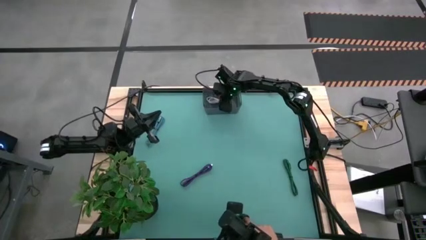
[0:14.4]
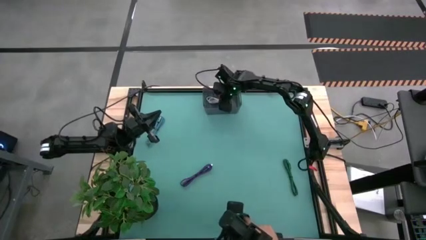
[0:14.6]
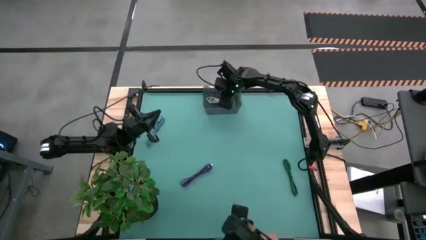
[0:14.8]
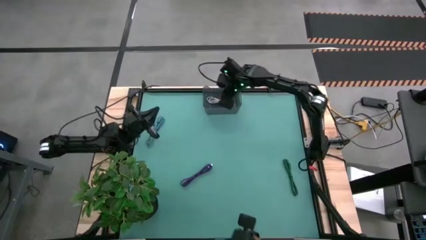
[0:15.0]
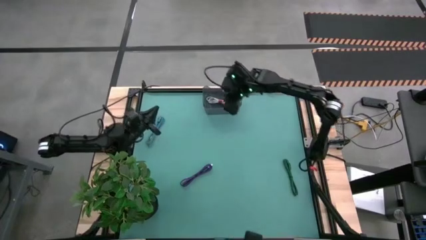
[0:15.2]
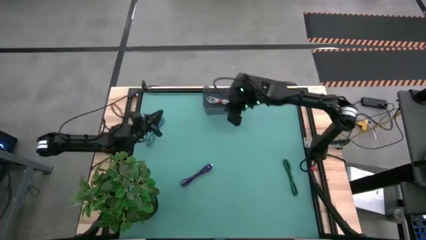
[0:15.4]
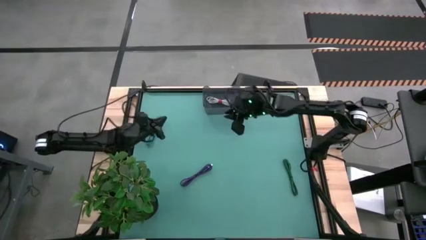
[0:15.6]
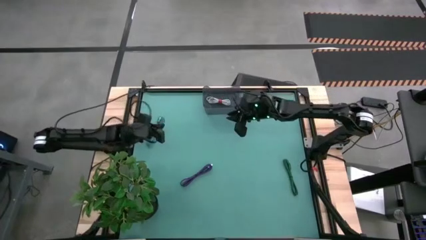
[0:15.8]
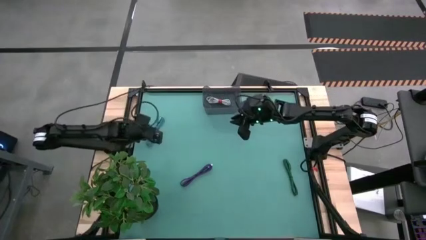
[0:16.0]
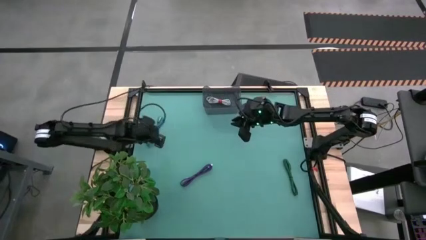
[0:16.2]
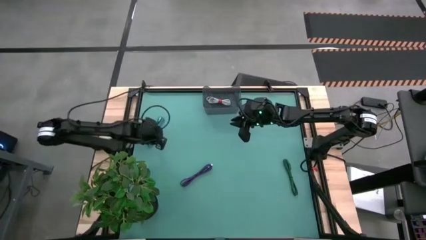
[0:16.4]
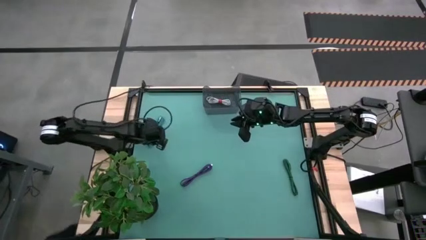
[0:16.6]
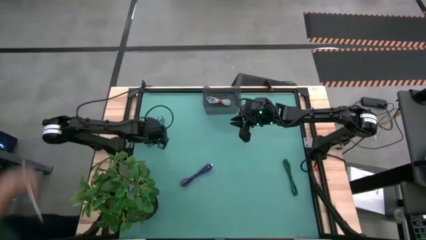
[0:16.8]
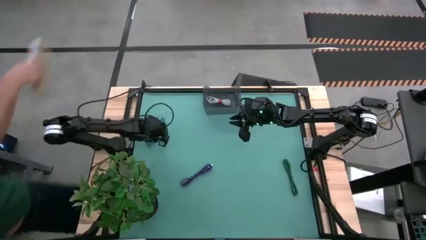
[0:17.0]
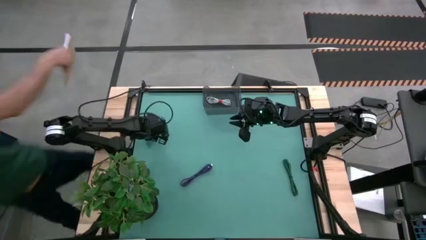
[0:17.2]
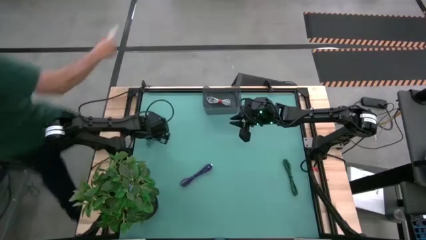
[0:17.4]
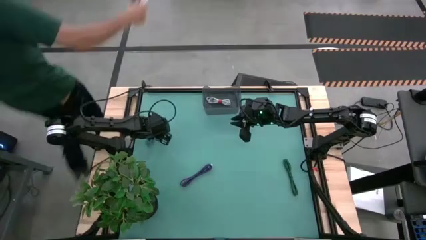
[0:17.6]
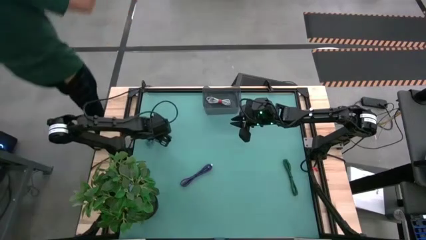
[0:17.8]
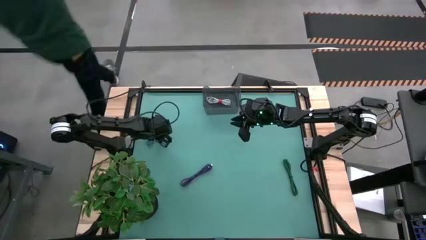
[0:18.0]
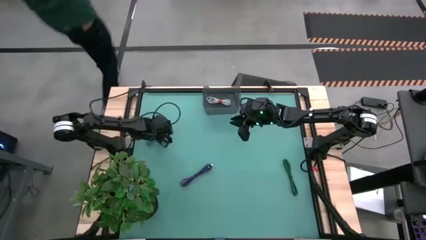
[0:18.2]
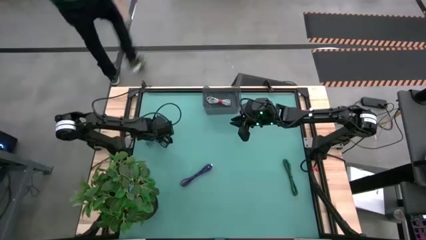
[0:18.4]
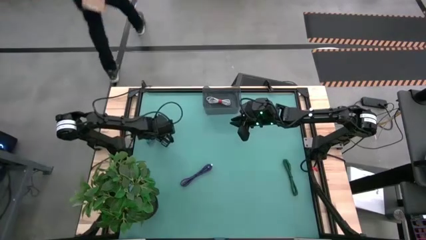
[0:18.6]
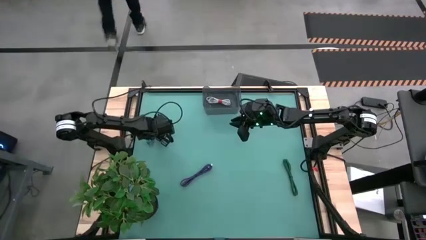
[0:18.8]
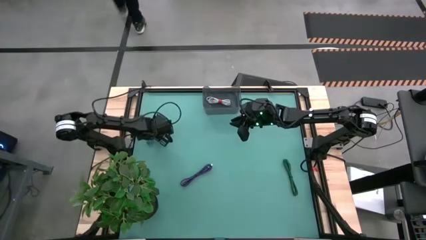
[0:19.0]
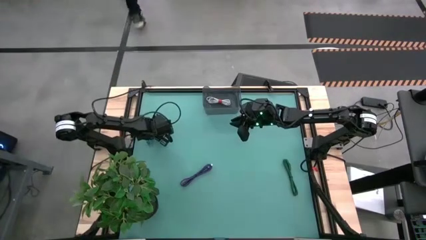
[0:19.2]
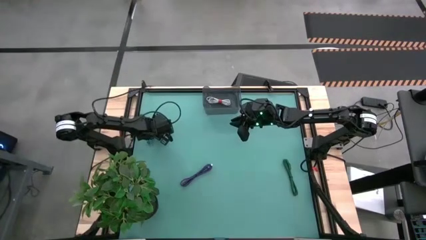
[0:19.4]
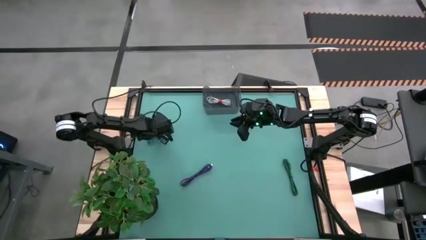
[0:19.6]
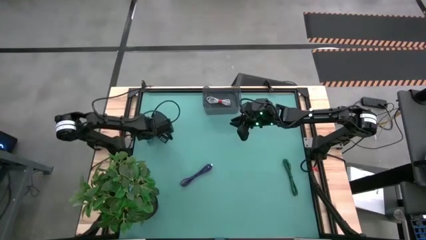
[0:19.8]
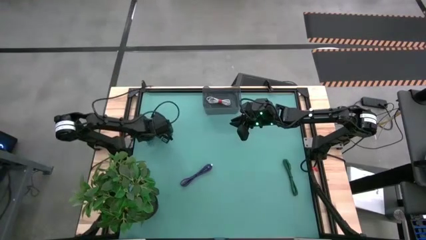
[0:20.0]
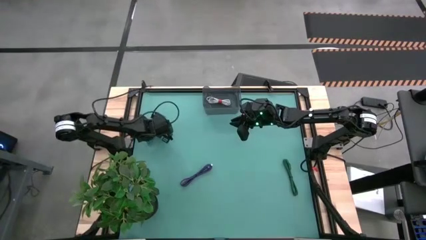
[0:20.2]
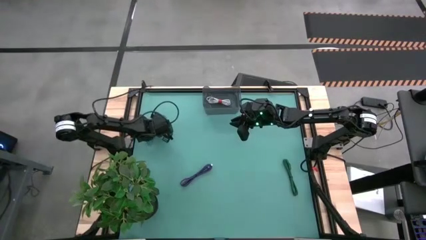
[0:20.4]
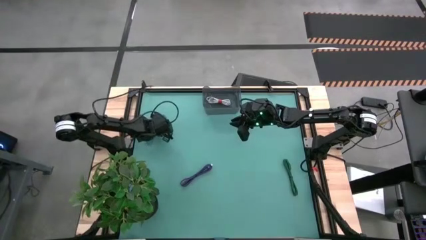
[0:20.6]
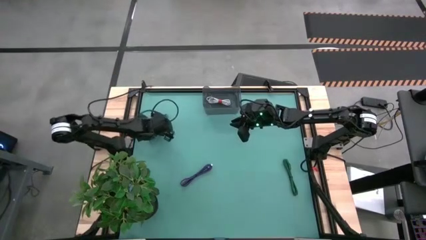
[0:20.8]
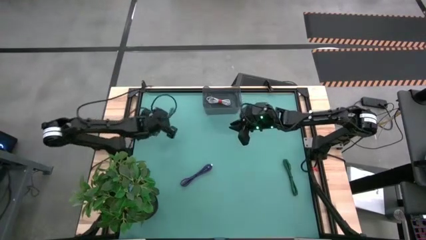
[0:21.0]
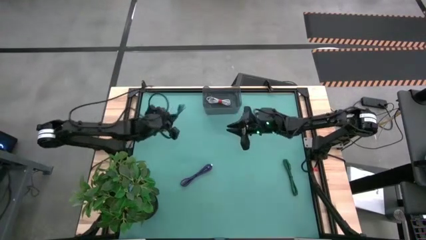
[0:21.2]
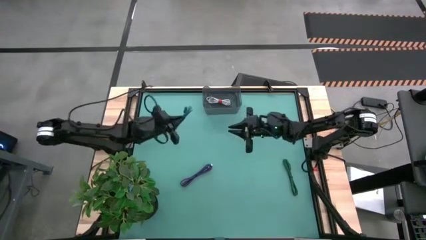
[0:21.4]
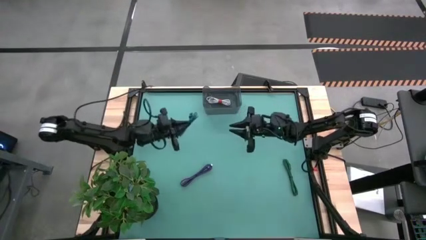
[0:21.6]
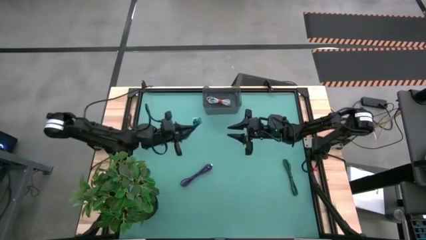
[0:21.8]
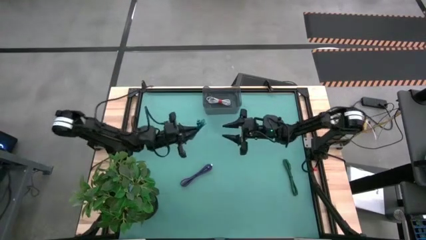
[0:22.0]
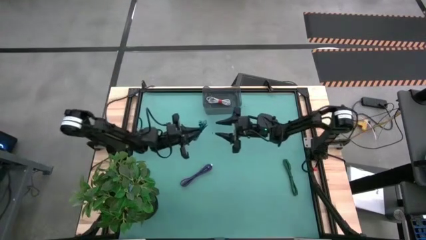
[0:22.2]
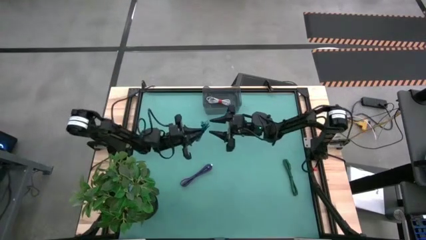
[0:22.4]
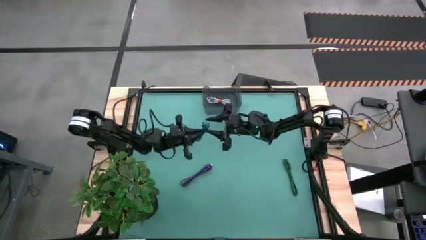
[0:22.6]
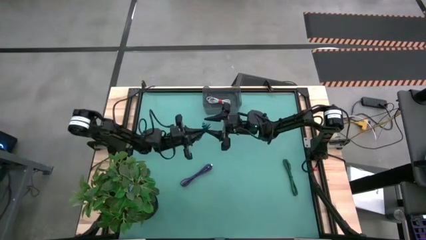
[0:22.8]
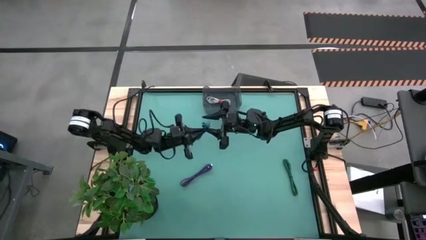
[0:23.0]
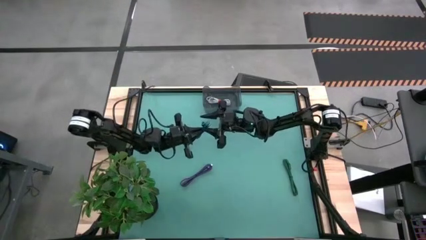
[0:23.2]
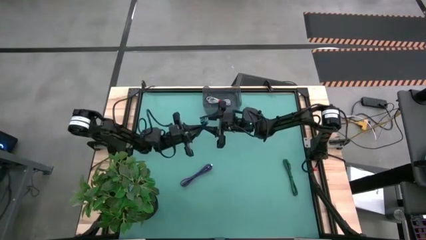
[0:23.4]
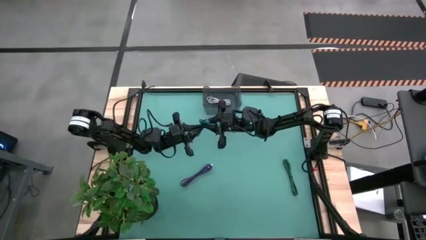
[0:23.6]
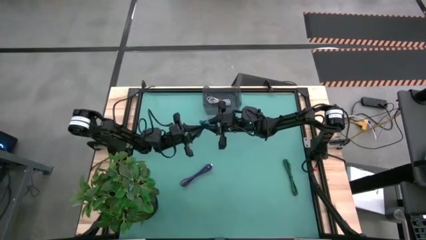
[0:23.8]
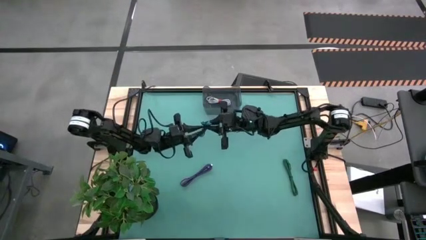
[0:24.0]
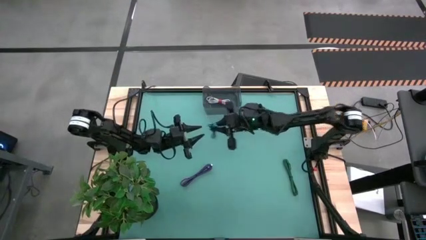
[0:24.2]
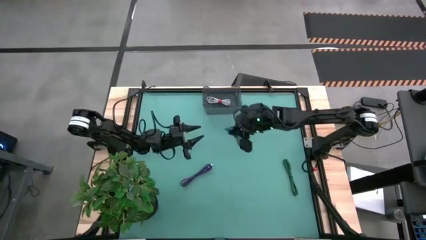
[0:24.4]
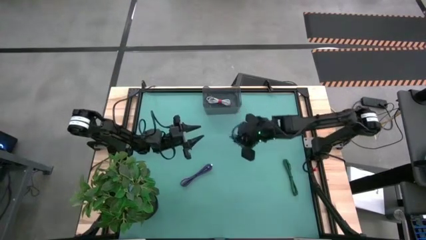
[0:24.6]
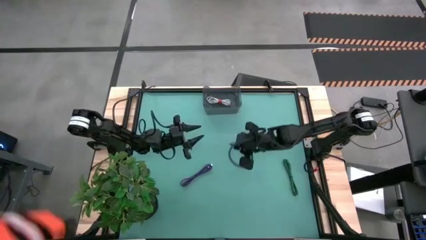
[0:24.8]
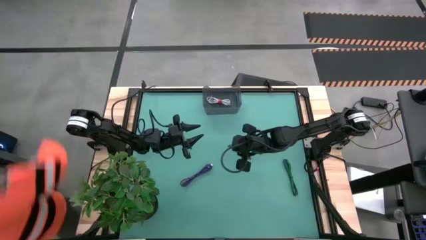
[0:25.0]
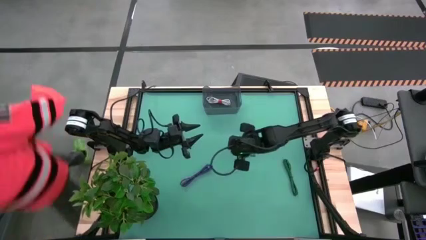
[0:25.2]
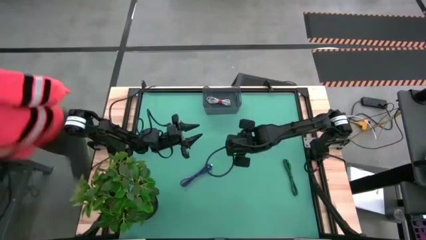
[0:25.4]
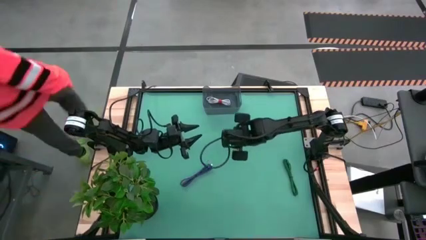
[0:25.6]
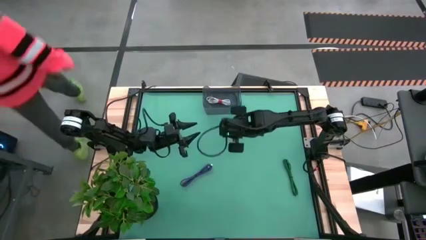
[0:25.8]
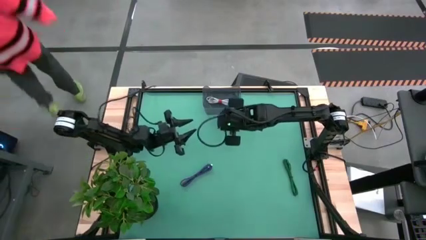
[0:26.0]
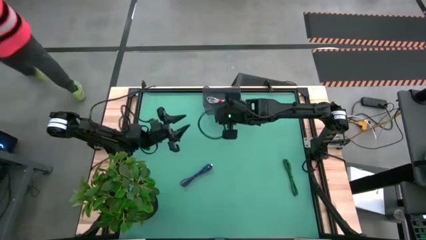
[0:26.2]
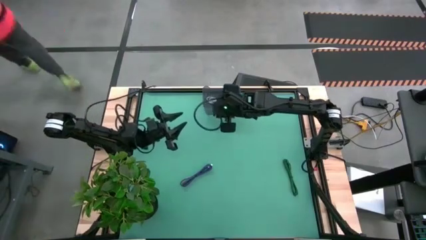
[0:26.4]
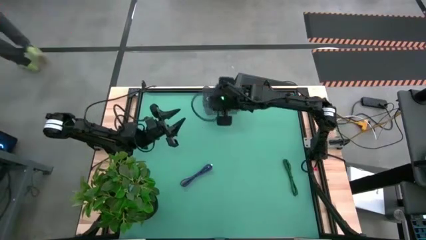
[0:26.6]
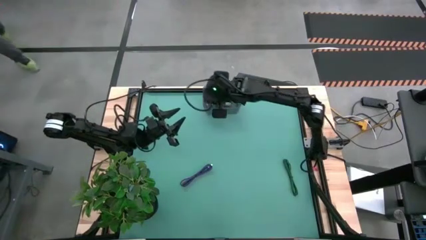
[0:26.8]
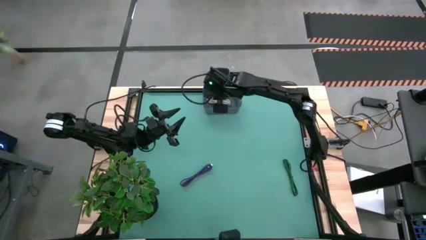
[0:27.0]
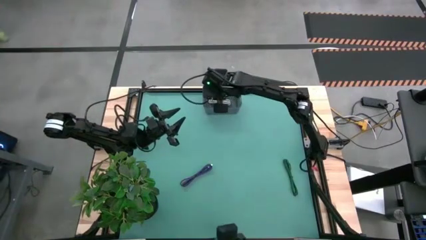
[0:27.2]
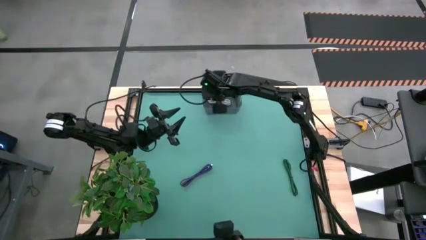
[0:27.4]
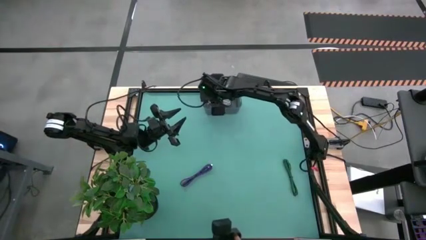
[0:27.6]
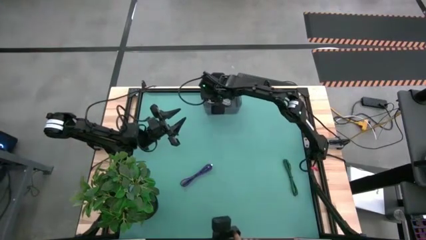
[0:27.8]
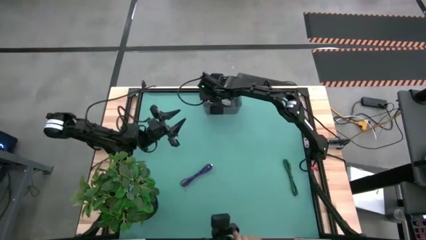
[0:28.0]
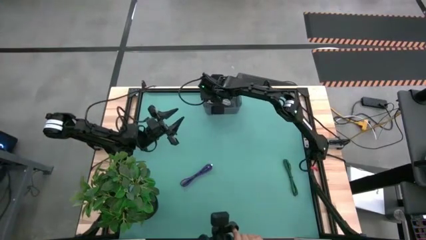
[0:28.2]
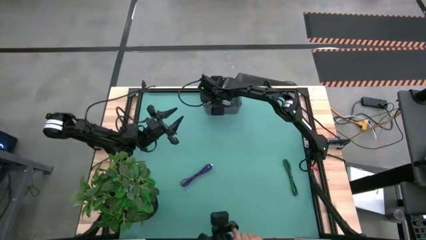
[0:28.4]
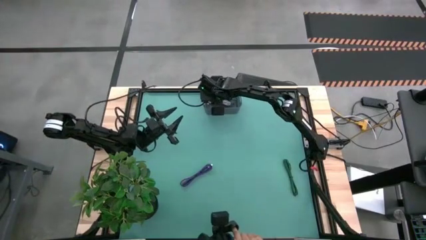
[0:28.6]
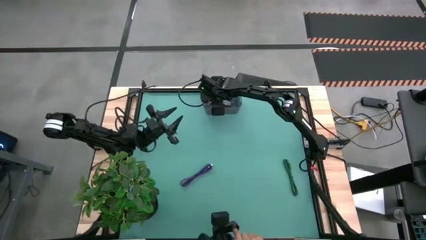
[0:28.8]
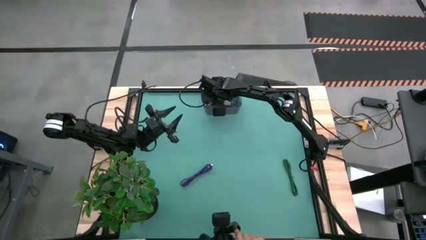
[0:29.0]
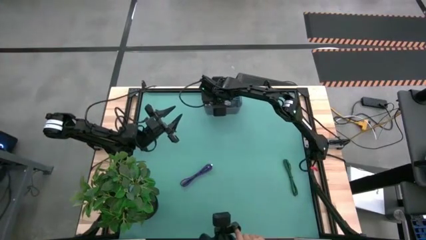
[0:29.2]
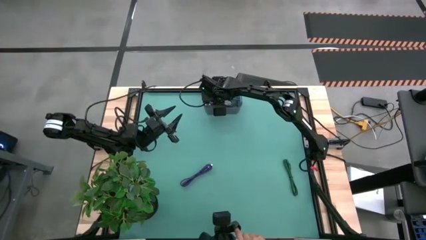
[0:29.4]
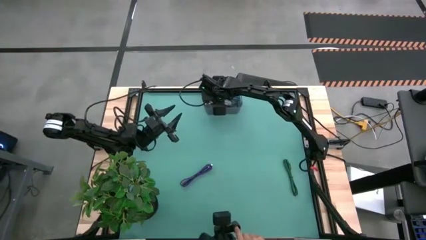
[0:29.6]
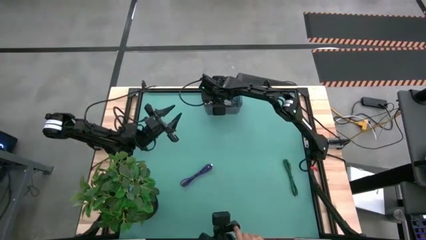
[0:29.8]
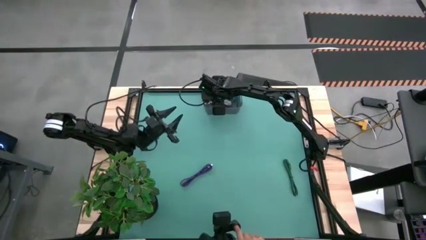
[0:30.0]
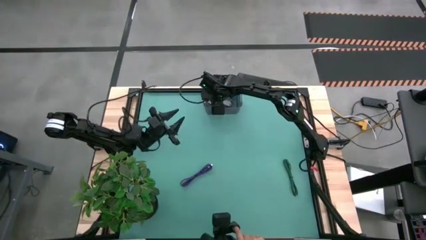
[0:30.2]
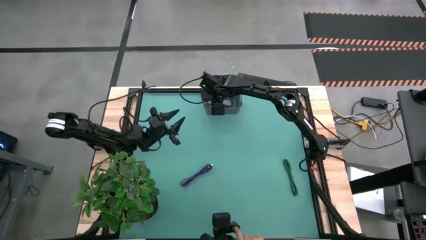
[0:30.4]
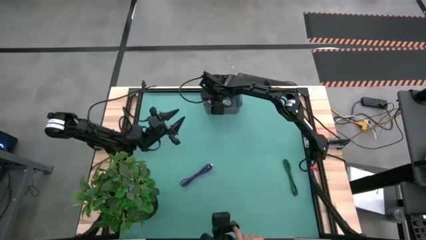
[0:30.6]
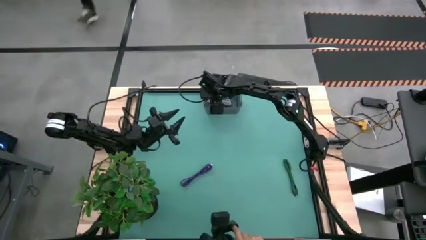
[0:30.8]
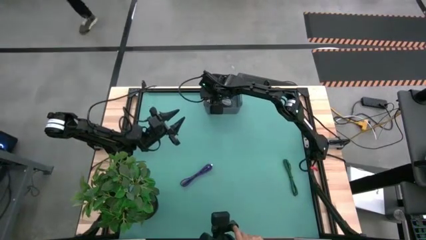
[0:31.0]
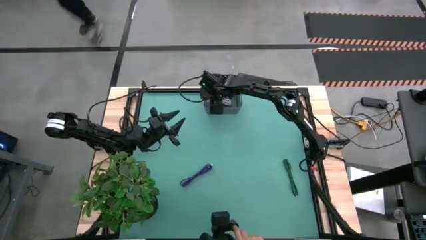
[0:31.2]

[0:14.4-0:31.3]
Task: Pick and place USB-C Cables
Put the blue charger cable into the black container
